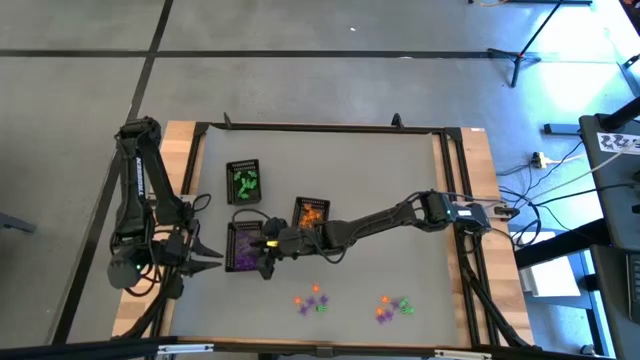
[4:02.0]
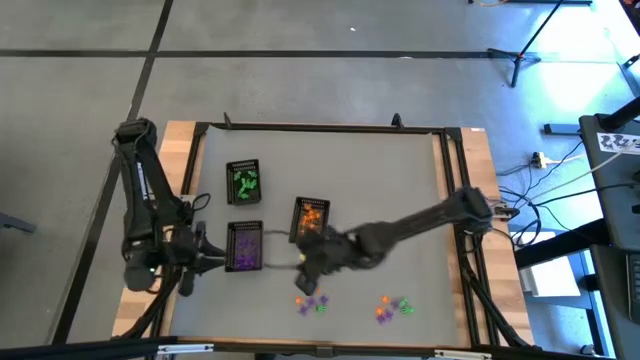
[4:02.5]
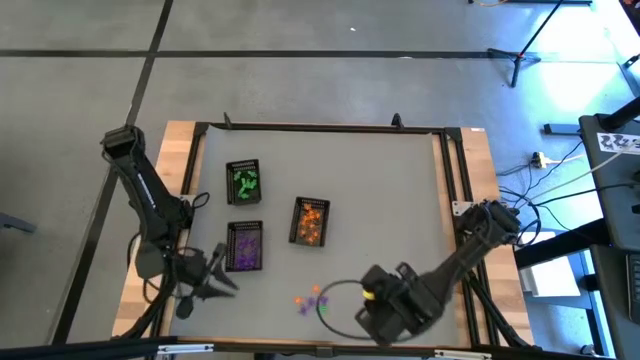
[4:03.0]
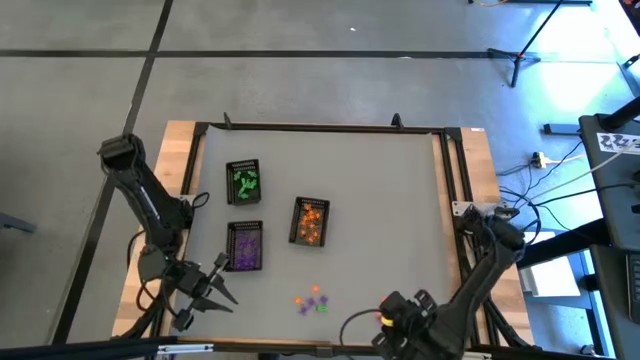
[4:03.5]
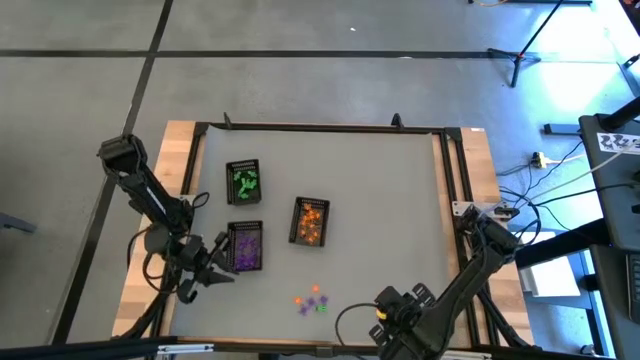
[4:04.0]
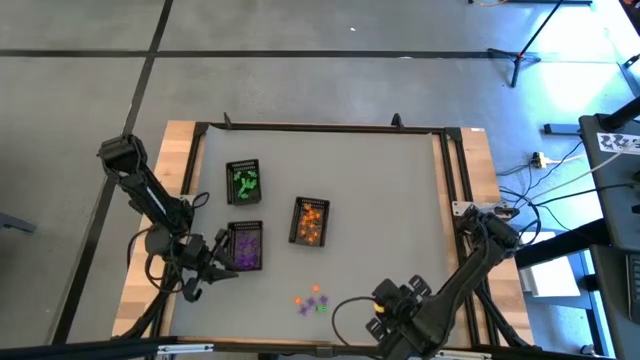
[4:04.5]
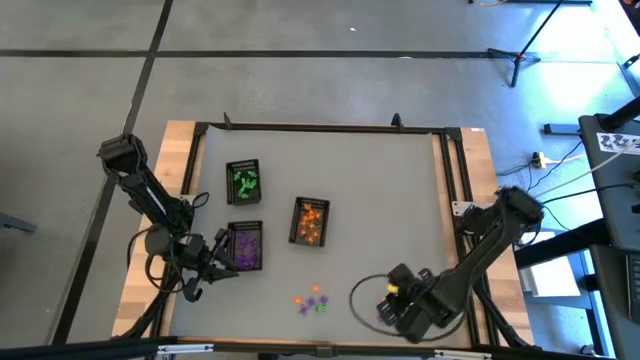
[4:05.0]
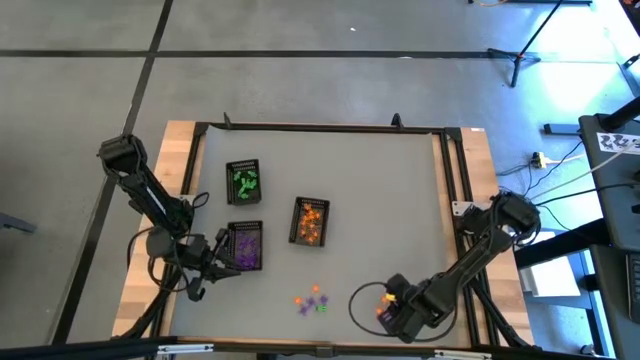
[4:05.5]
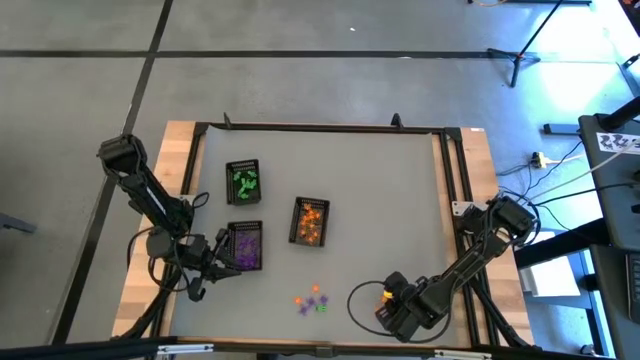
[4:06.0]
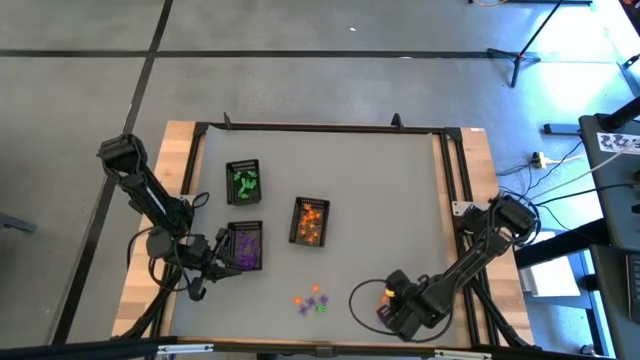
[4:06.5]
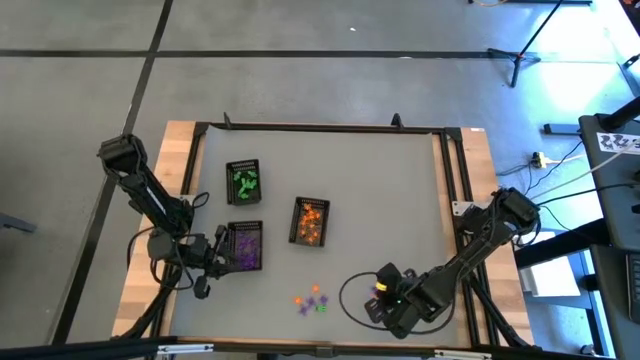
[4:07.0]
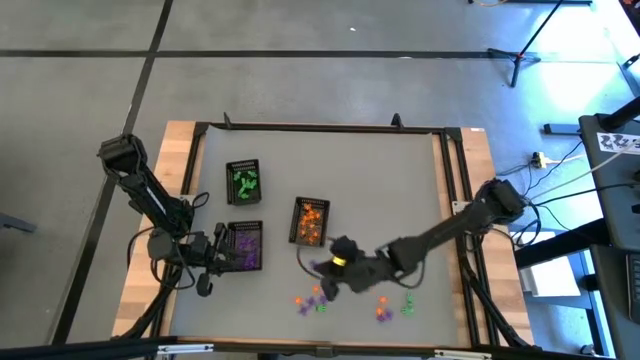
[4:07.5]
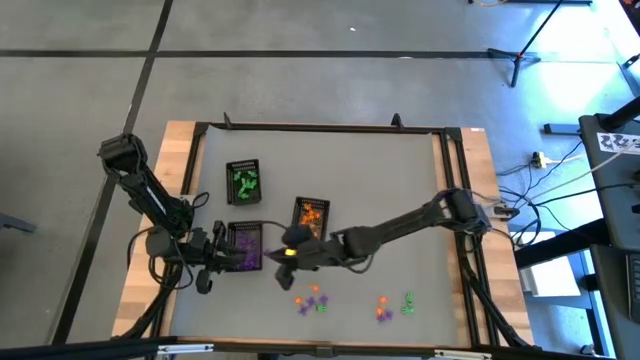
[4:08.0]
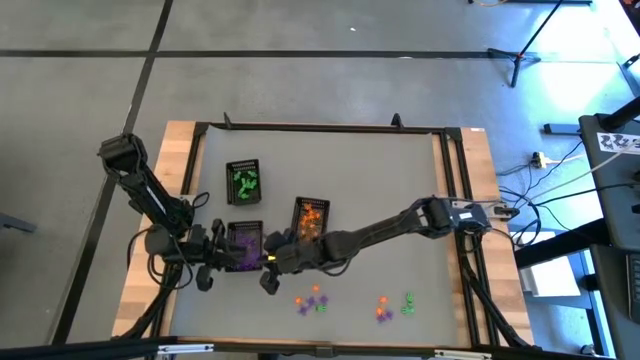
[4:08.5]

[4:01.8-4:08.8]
Task: Sort Halloween decoration
Put the purple spider toy into the bottom left black basket

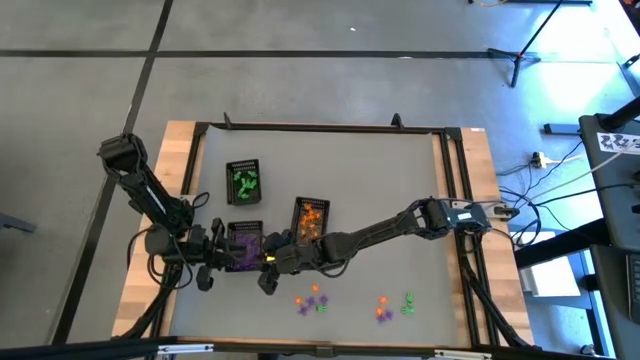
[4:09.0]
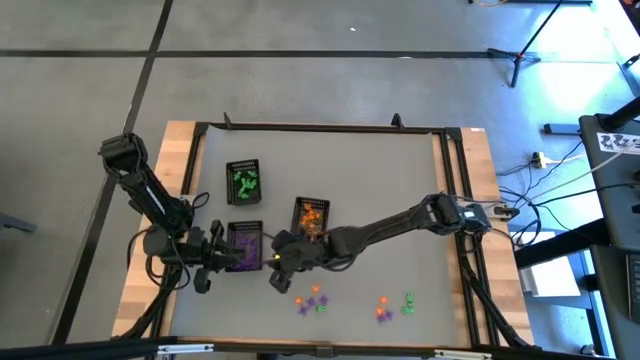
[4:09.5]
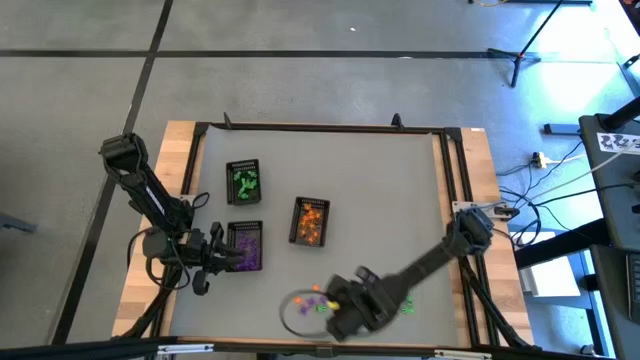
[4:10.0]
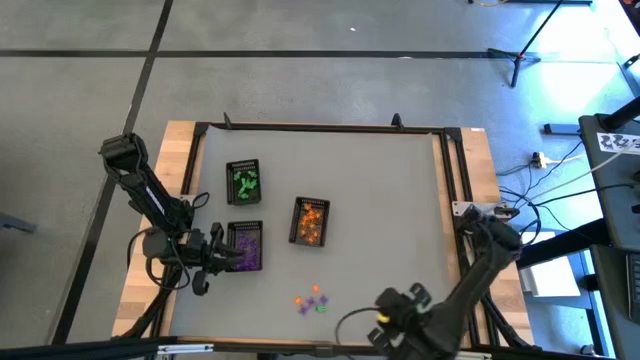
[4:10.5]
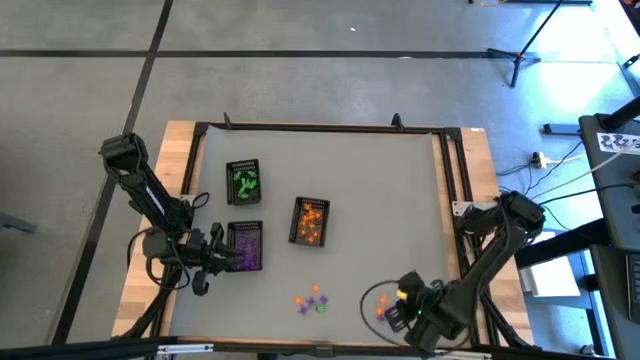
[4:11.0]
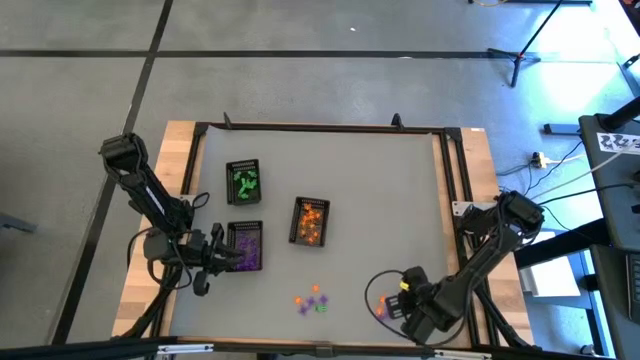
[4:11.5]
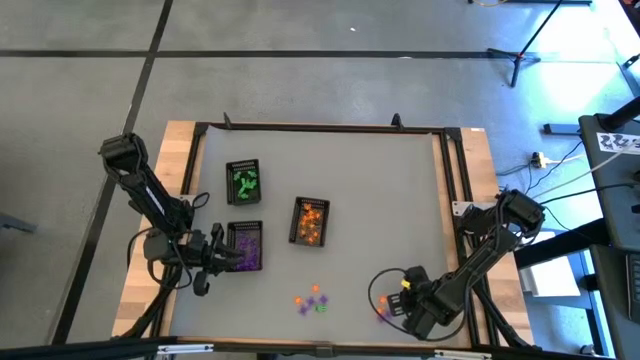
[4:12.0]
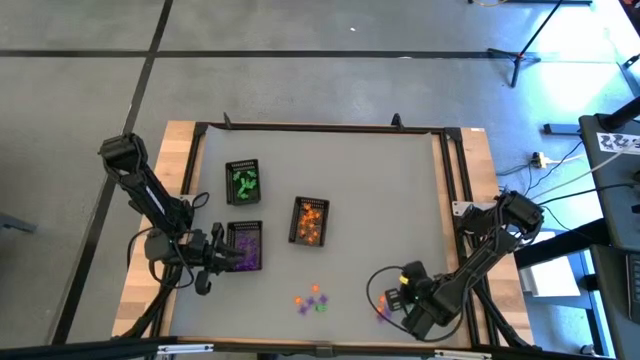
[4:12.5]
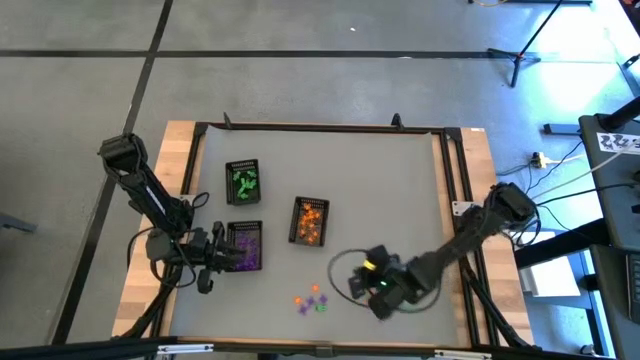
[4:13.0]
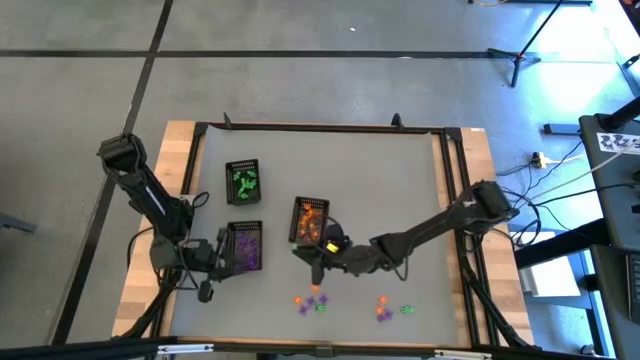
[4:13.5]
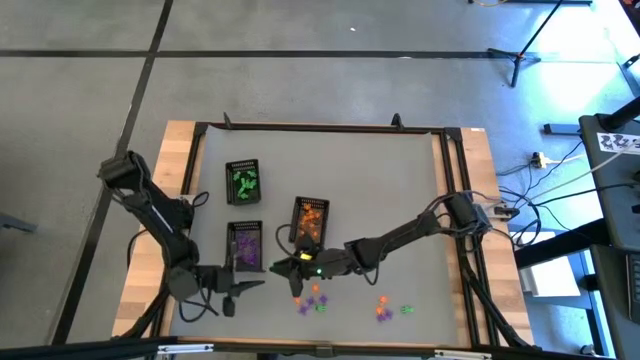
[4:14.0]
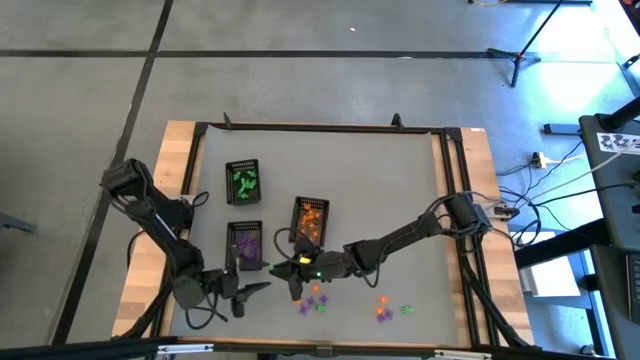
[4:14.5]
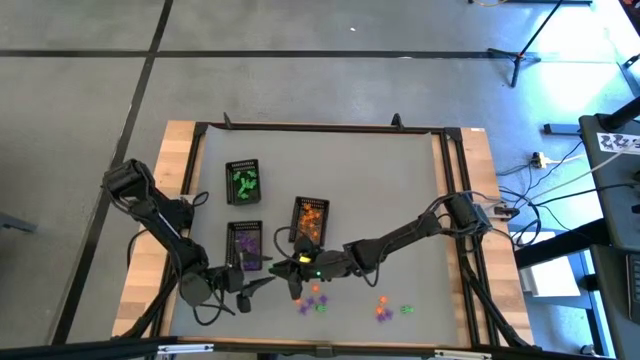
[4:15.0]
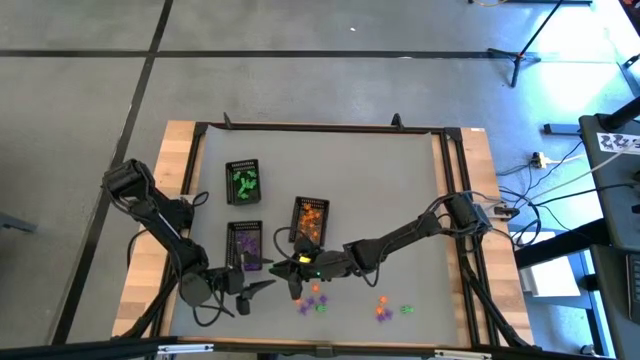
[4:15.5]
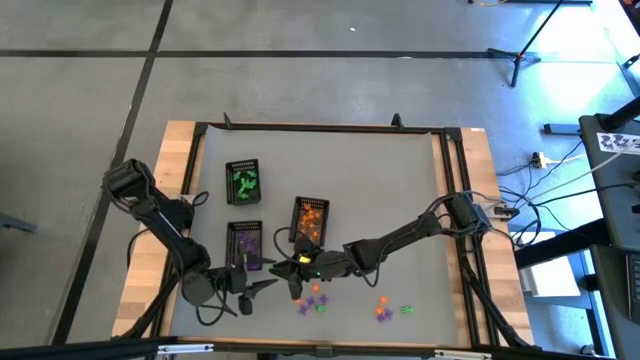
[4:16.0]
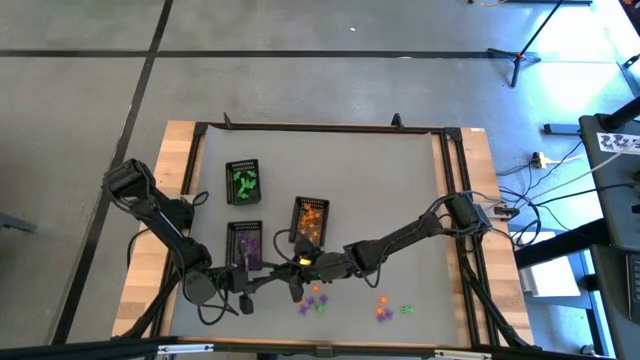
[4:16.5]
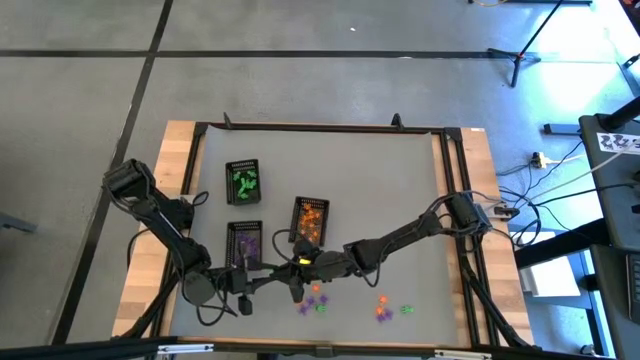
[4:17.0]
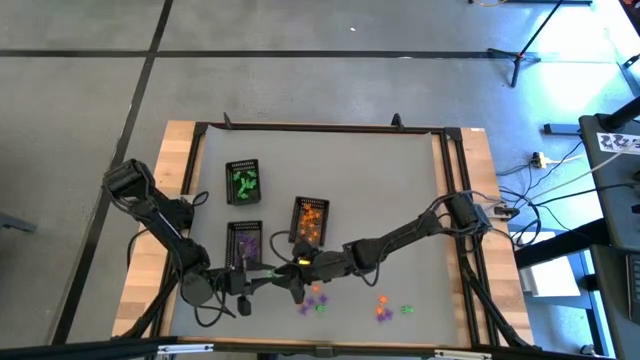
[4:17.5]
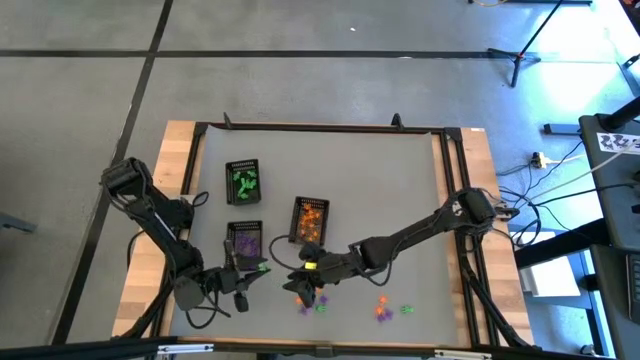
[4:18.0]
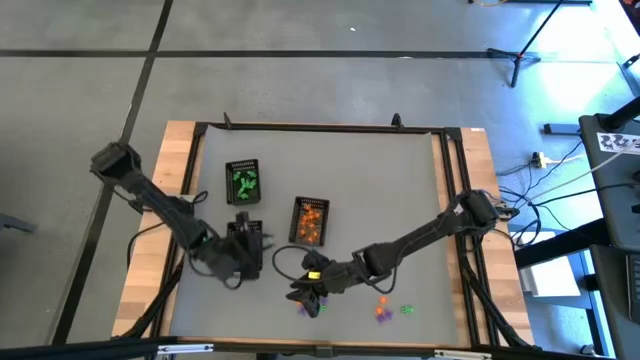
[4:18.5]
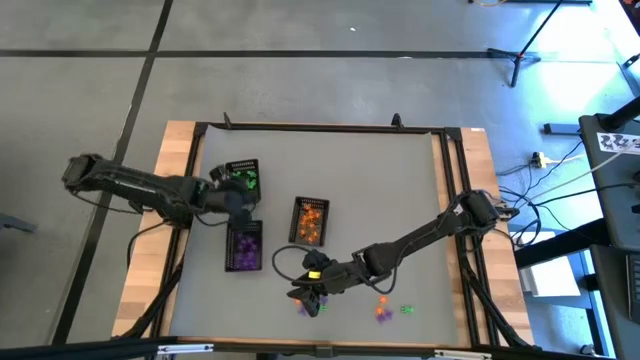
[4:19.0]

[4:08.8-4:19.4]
Put the green alien toy into the top left black basket

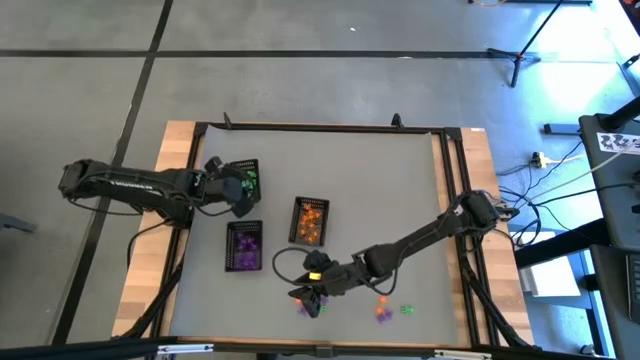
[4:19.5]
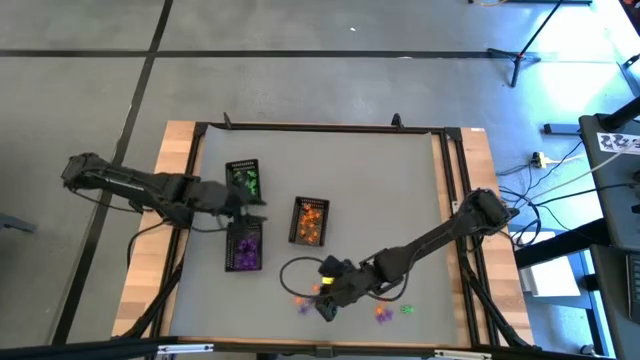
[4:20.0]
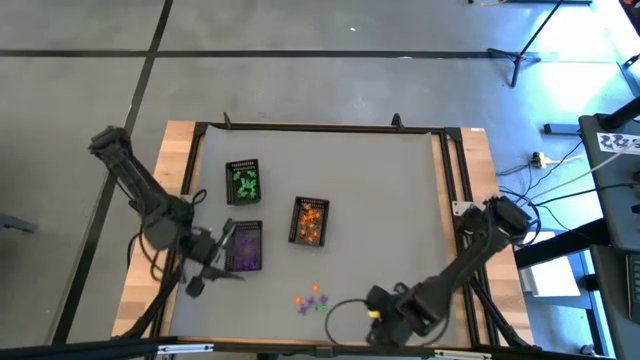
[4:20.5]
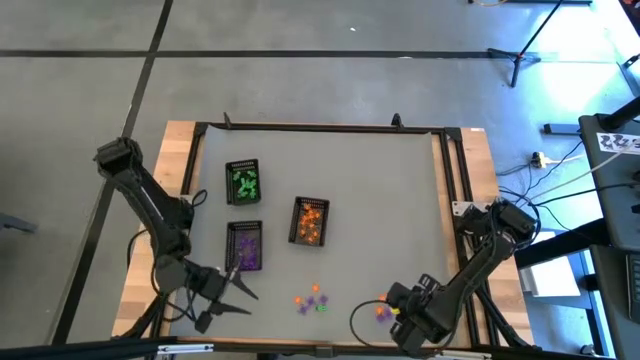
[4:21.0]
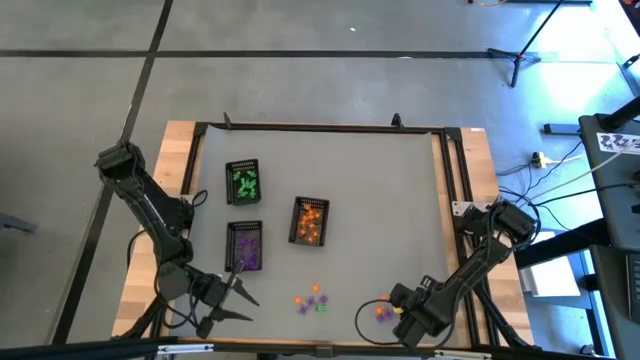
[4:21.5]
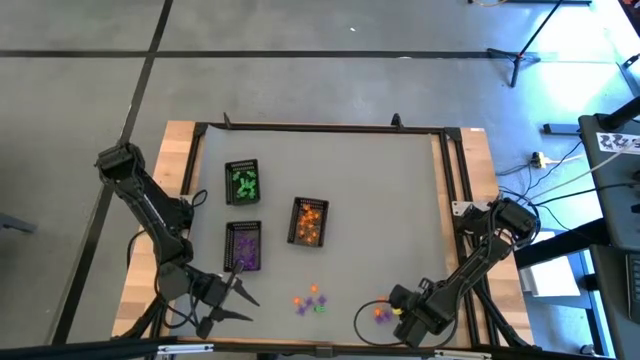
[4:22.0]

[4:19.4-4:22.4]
Put the green alien toy into the top left black basket

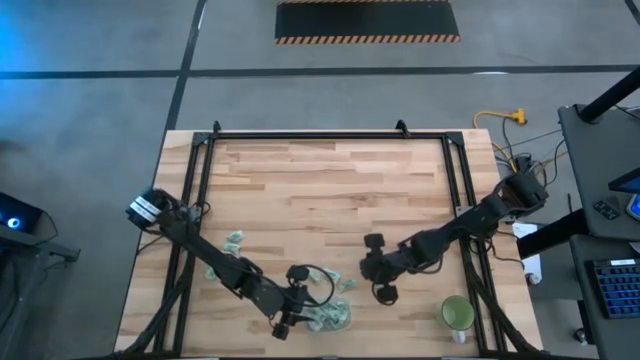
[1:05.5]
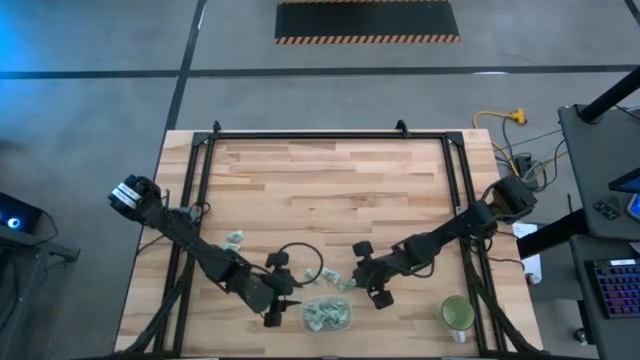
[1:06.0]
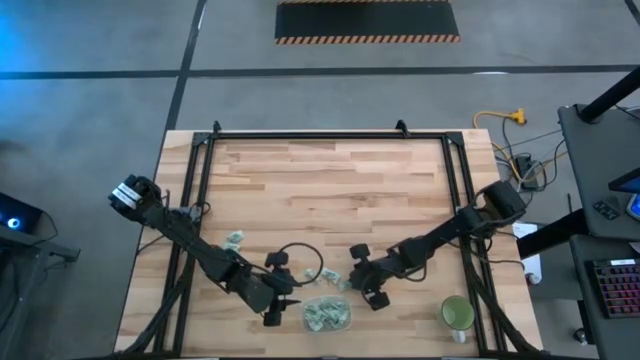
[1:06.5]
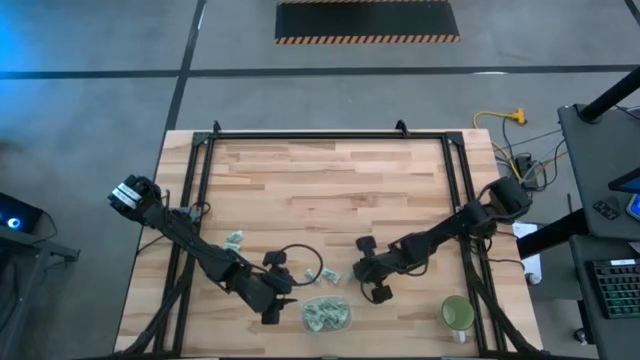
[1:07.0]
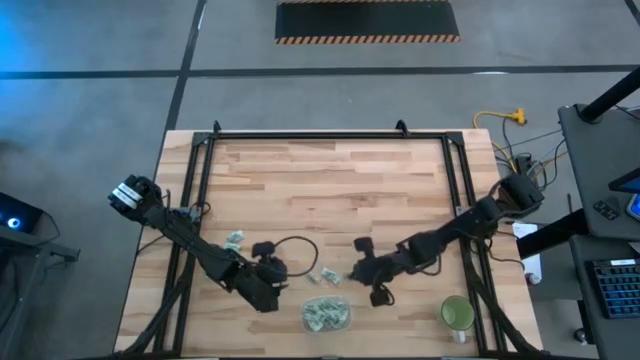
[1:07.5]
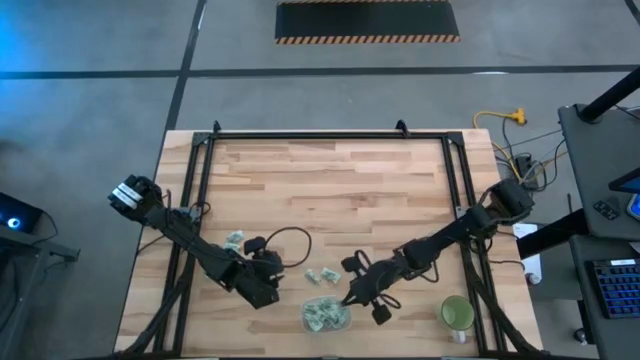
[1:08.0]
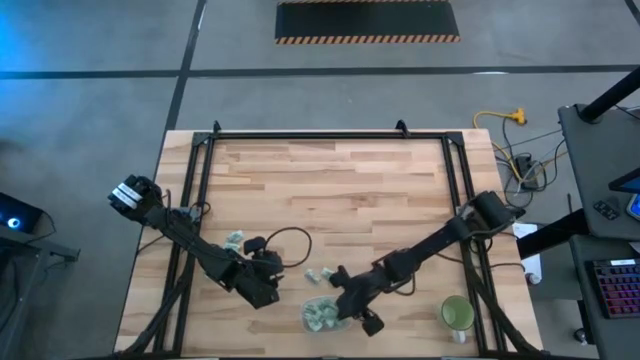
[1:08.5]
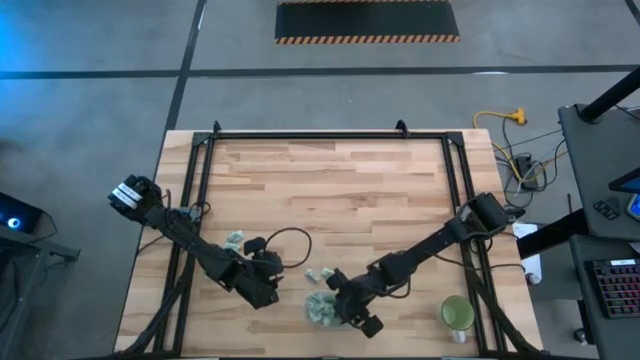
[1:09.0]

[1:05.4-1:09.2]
Task: Pick and place Stevia / Truvia into bins
Put the stevia packet into the transparent container
